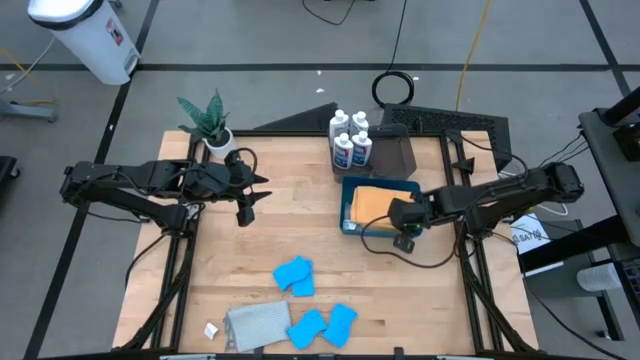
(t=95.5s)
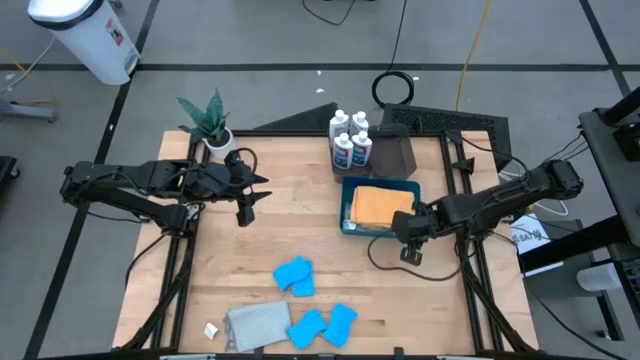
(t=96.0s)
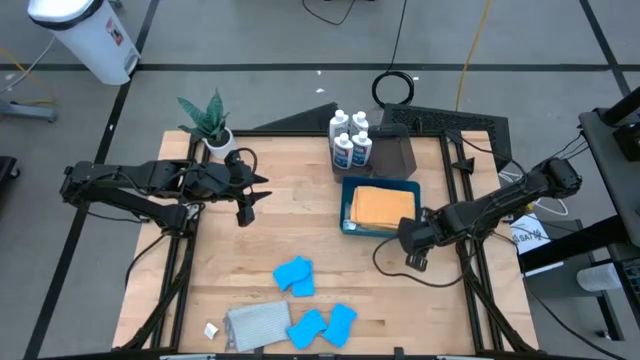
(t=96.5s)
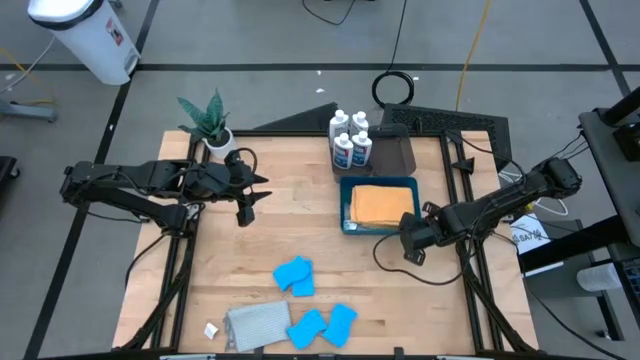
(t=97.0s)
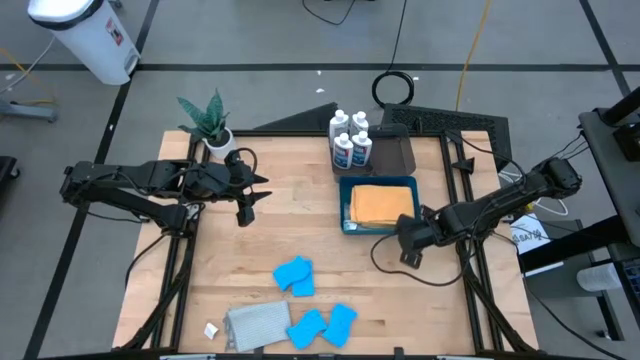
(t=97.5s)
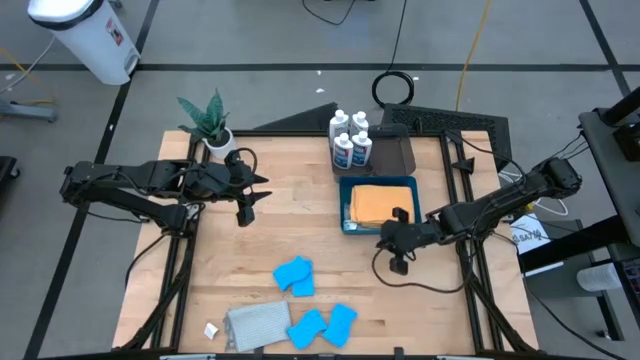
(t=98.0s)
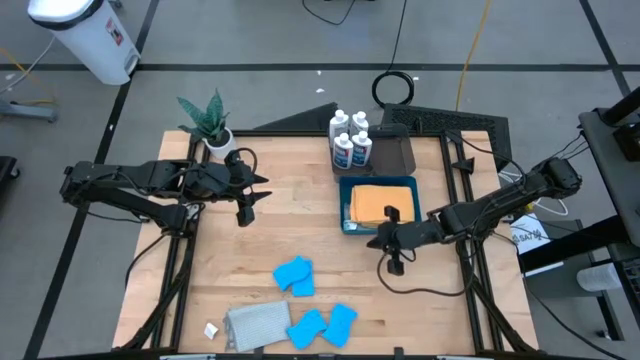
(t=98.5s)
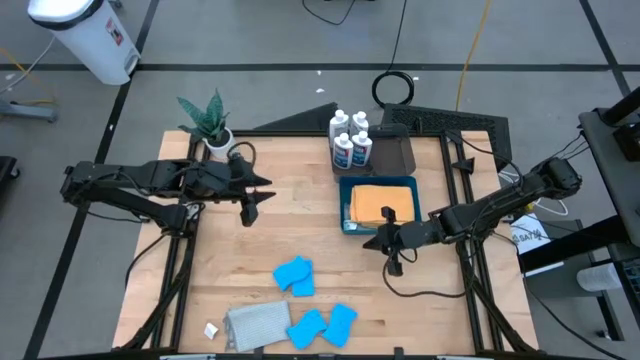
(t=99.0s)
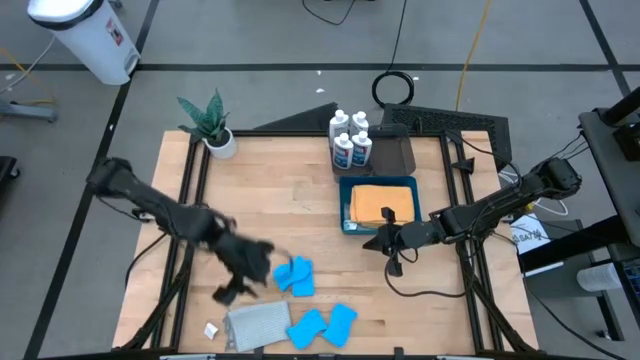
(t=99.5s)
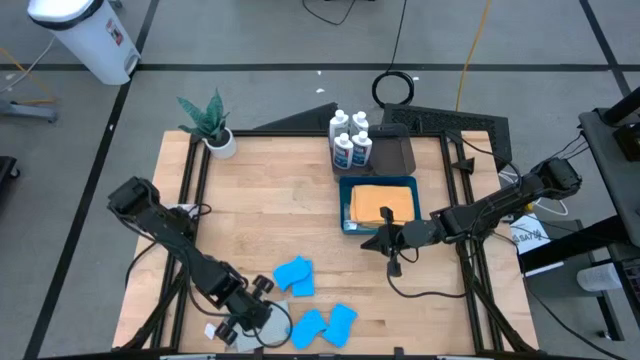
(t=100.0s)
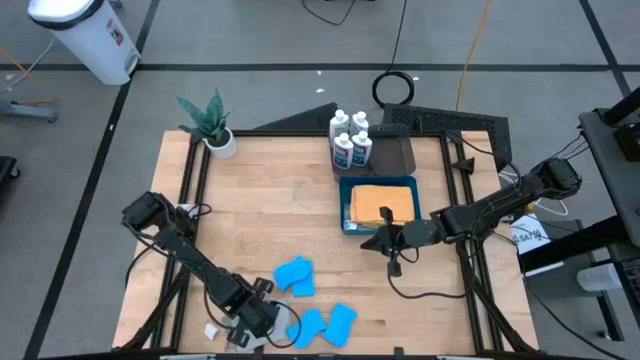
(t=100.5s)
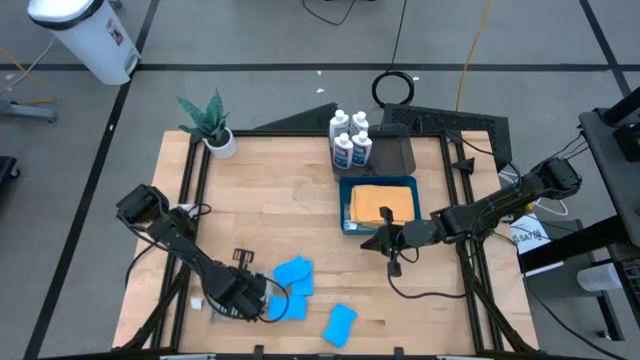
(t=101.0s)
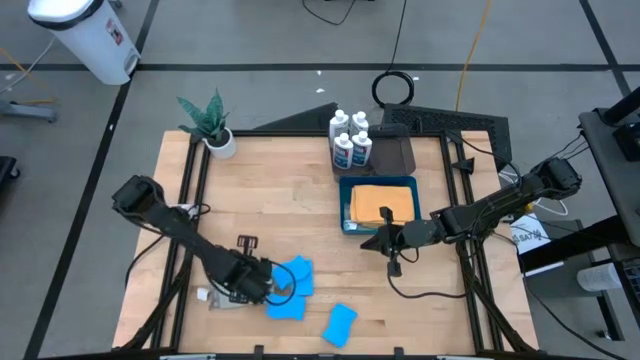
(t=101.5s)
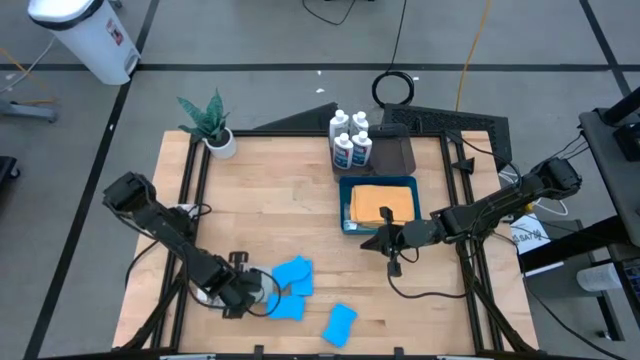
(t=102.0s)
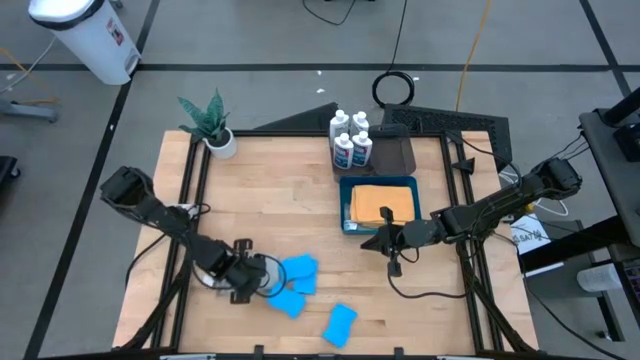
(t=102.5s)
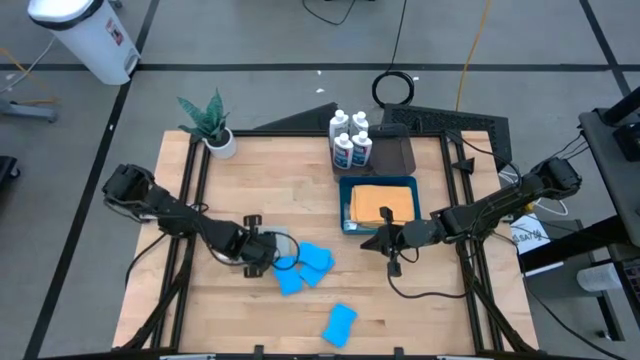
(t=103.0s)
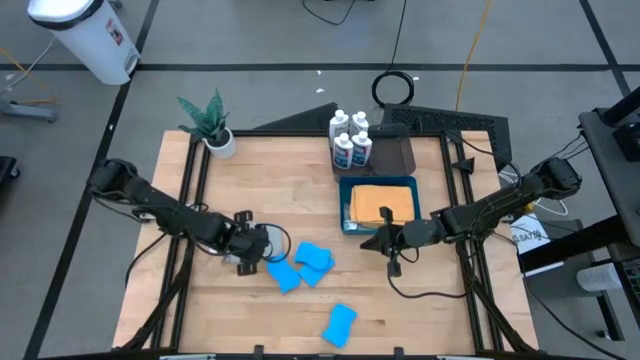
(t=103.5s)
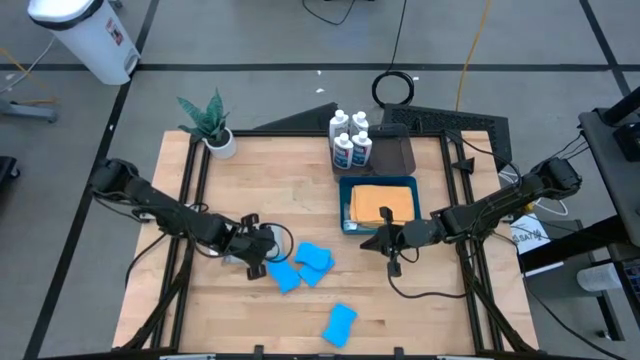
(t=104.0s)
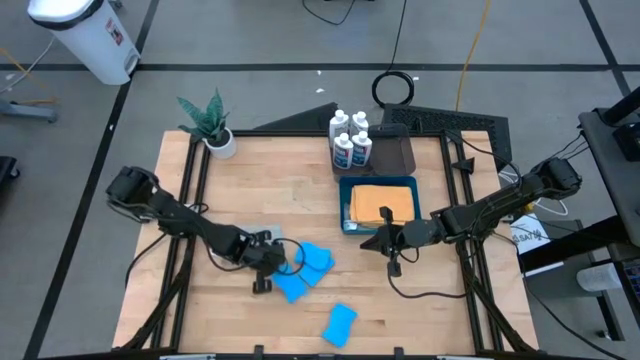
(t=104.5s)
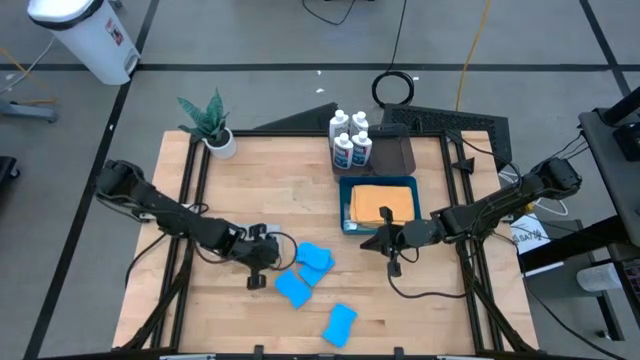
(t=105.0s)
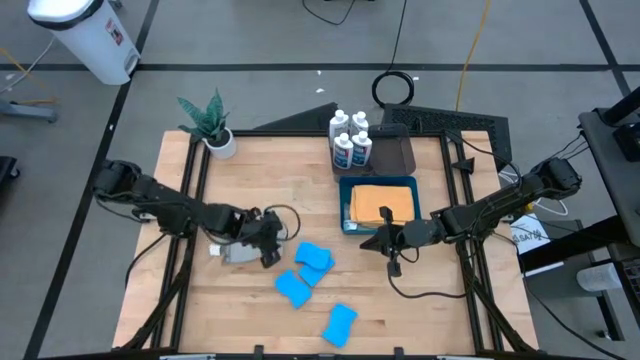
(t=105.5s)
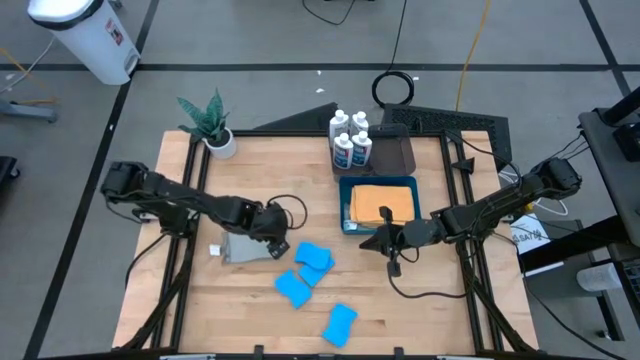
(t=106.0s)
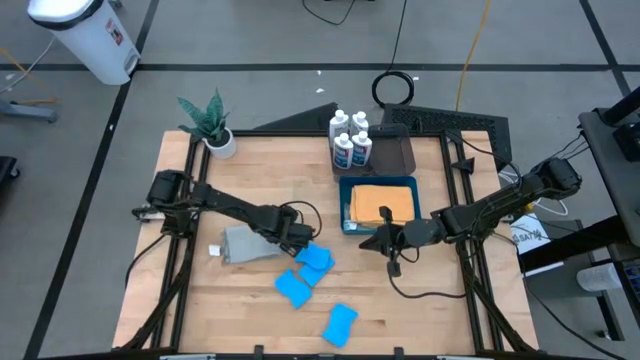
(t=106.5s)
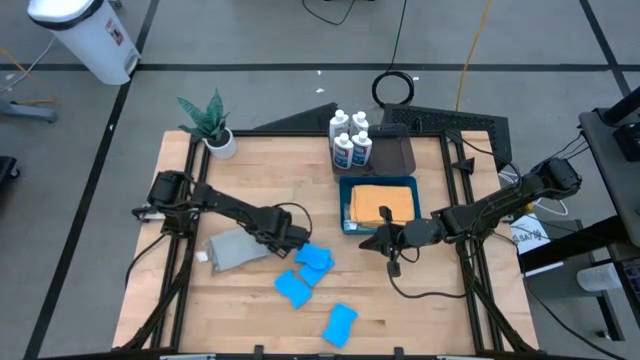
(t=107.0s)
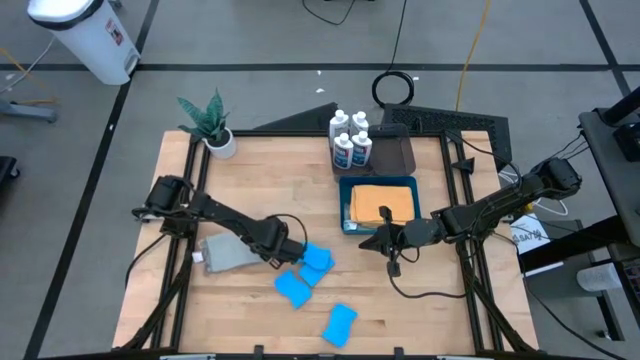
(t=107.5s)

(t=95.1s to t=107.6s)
Task: Pick & Place Kitchen Items
Put the black napkin into the blue bin

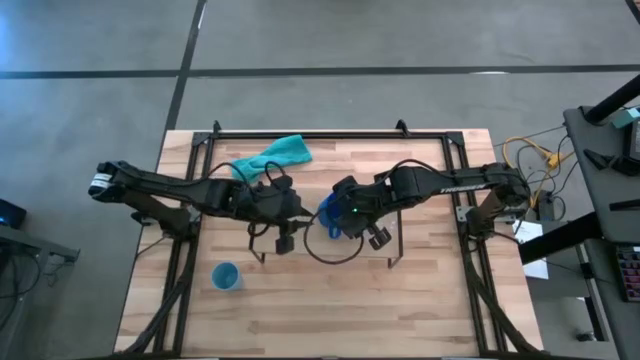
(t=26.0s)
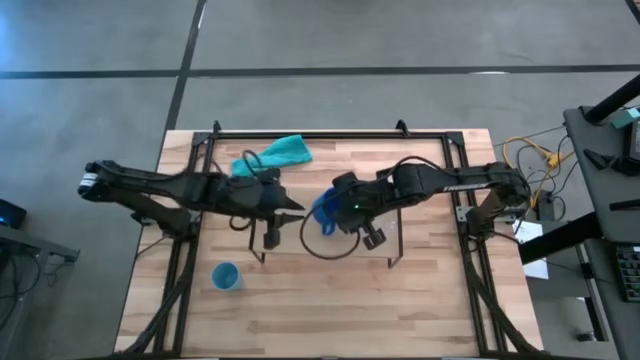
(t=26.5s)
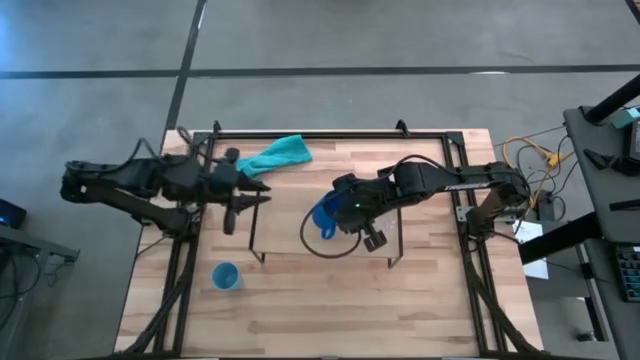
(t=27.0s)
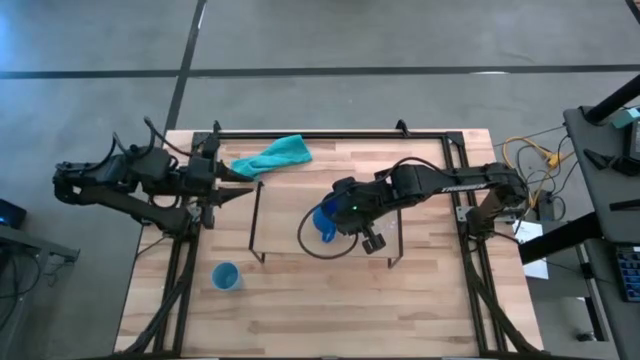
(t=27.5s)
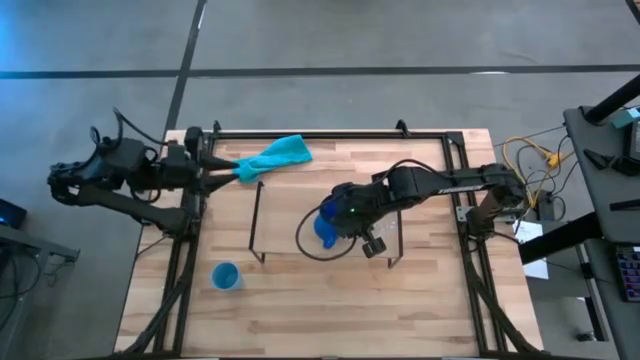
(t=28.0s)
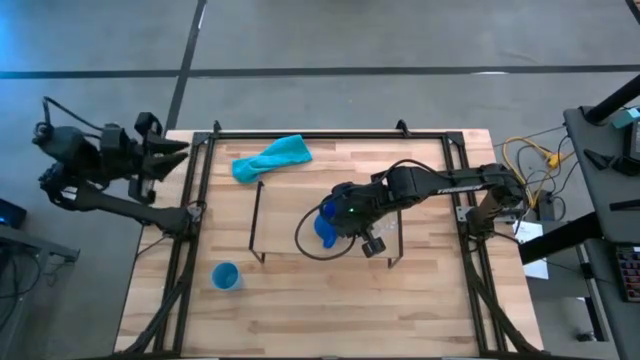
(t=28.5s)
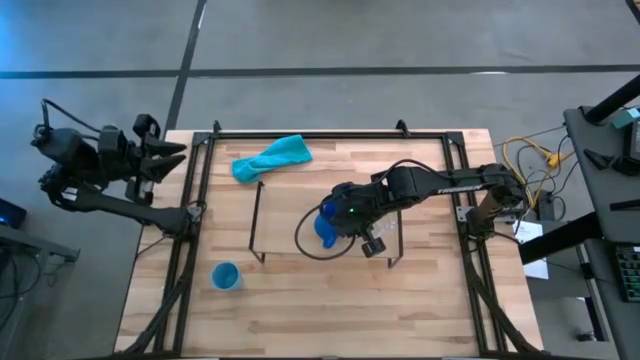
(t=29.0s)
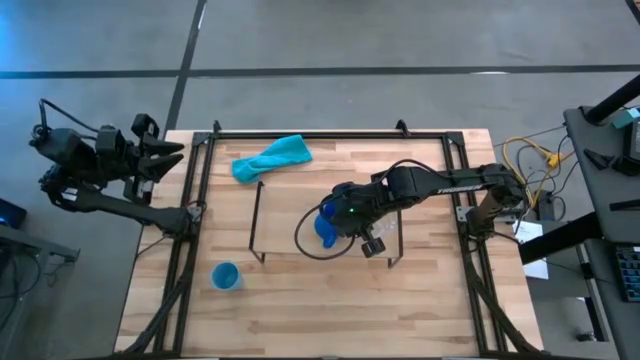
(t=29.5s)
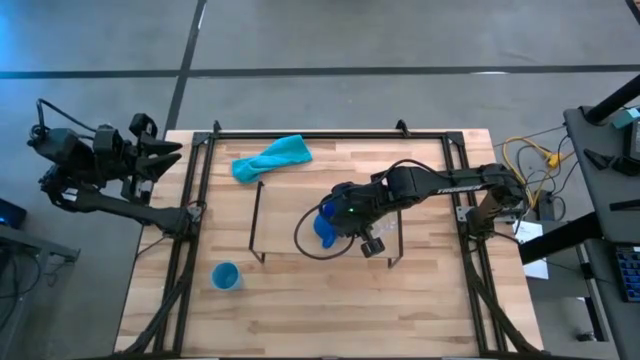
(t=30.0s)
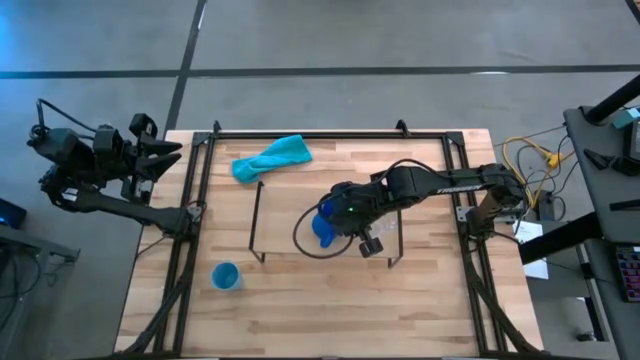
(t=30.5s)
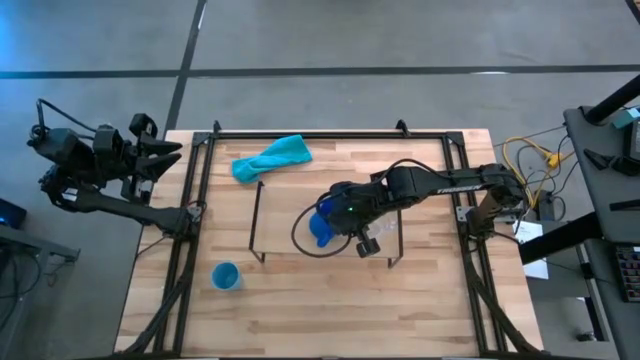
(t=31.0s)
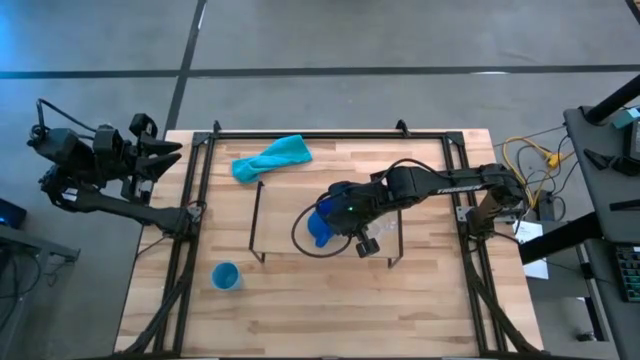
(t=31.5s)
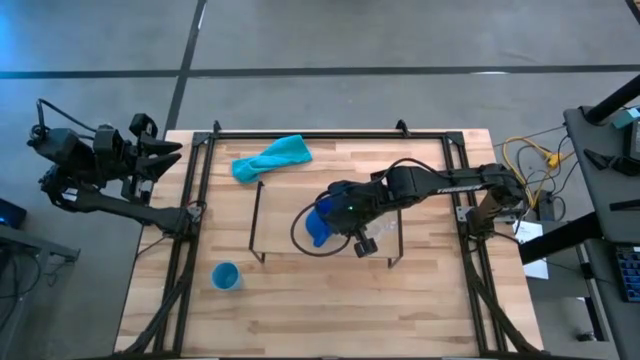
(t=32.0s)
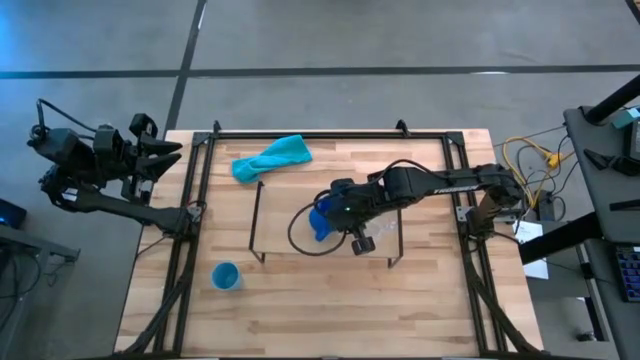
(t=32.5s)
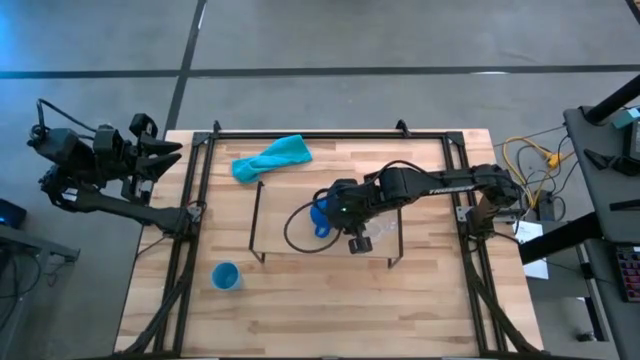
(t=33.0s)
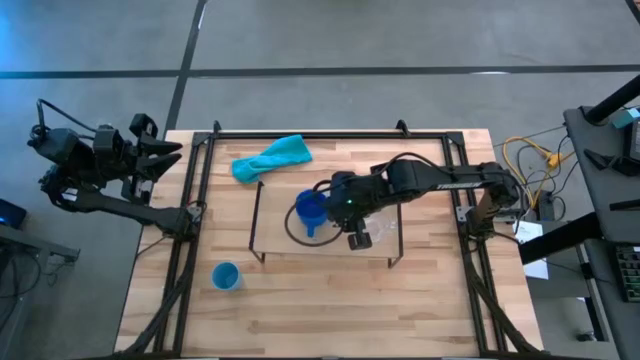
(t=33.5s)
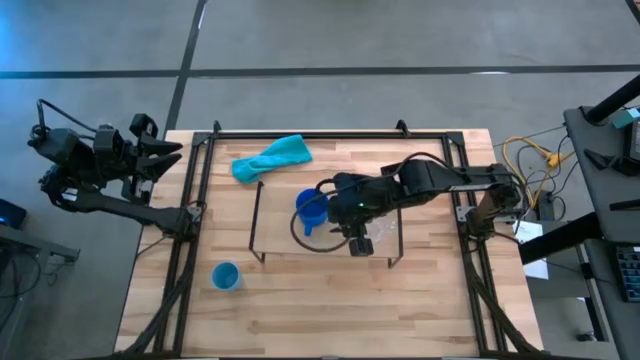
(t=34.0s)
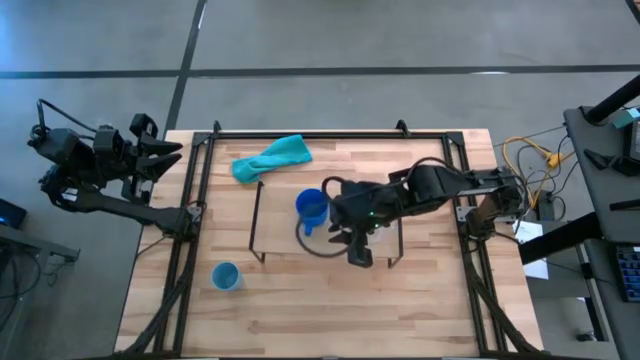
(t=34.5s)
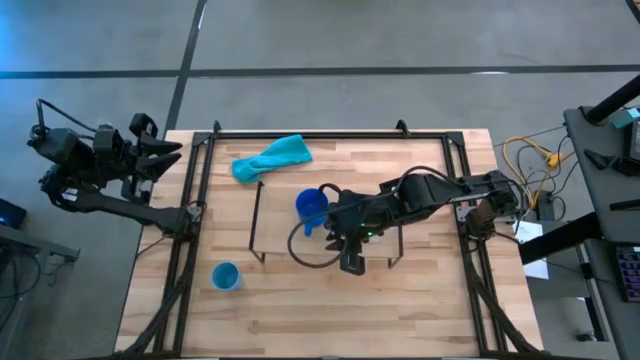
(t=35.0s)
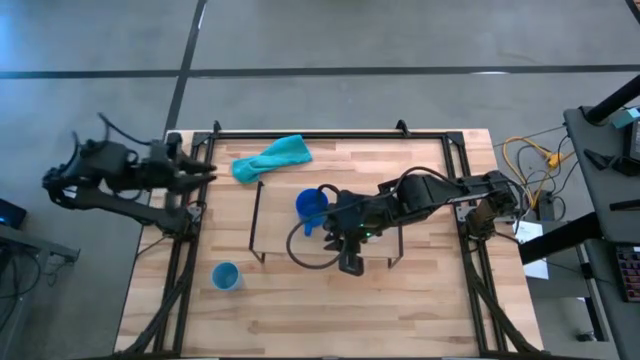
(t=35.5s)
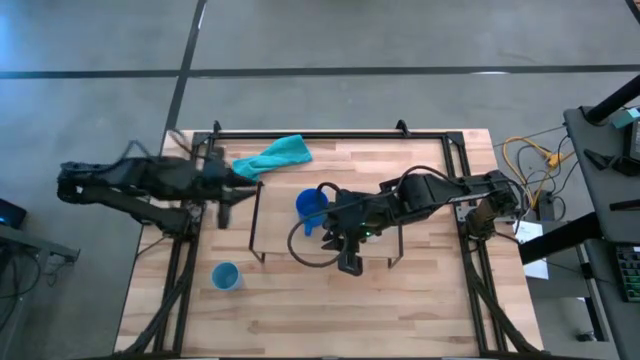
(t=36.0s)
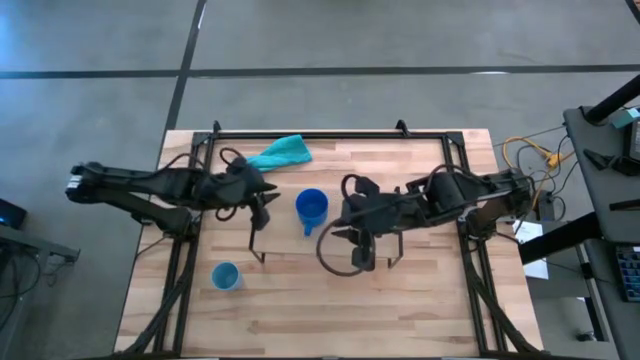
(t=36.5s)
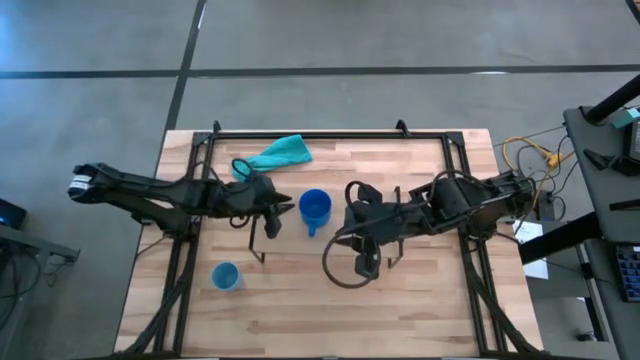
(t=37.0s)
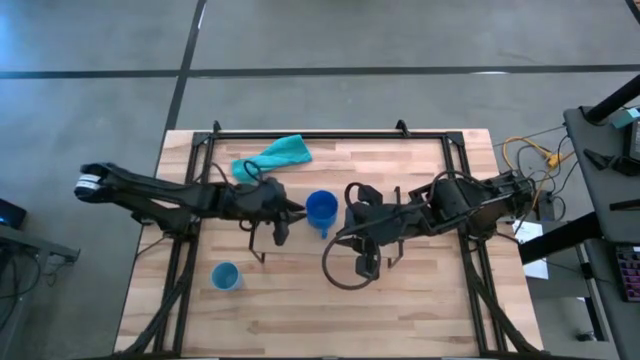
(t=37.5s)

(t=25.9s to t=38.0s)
Task: Stack small to large cups/mugs on shelf
Put the blue cup on the shelf
